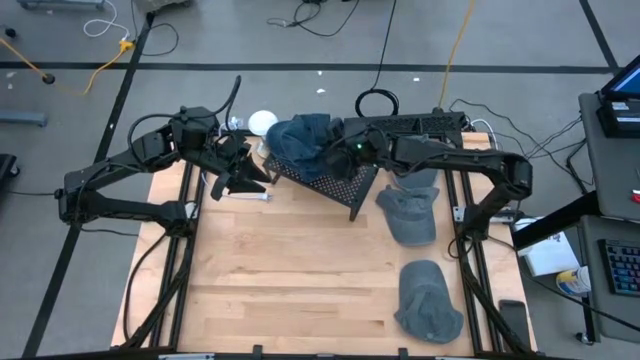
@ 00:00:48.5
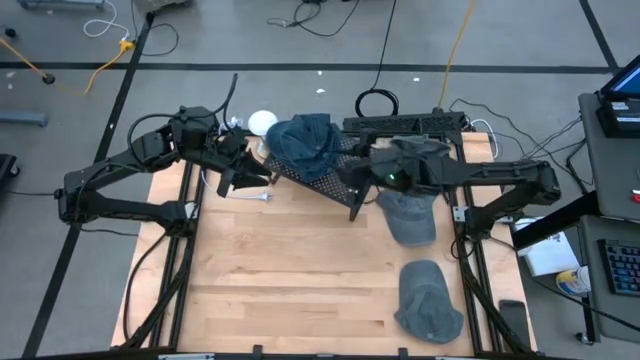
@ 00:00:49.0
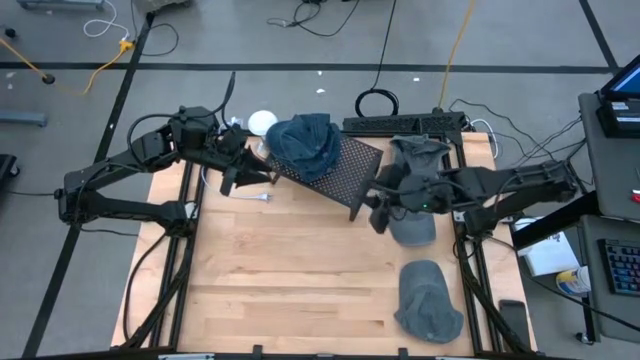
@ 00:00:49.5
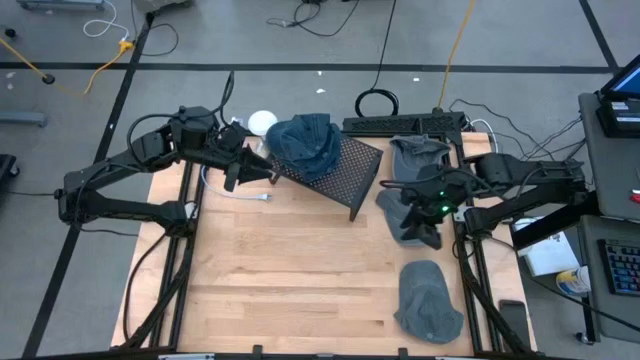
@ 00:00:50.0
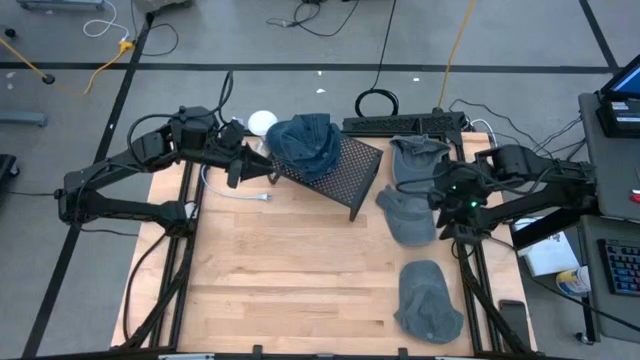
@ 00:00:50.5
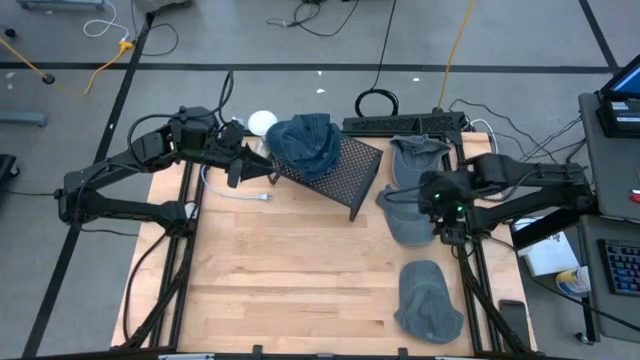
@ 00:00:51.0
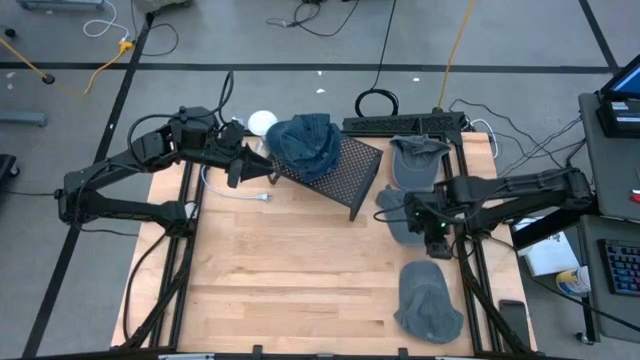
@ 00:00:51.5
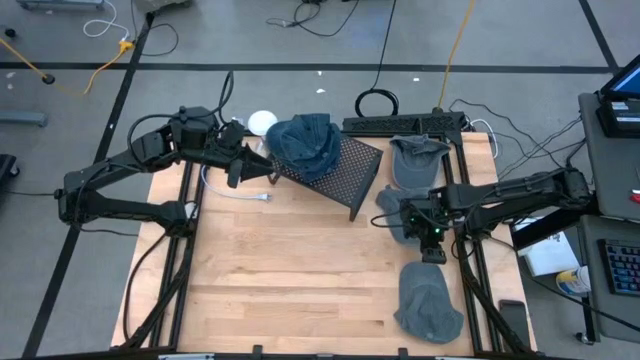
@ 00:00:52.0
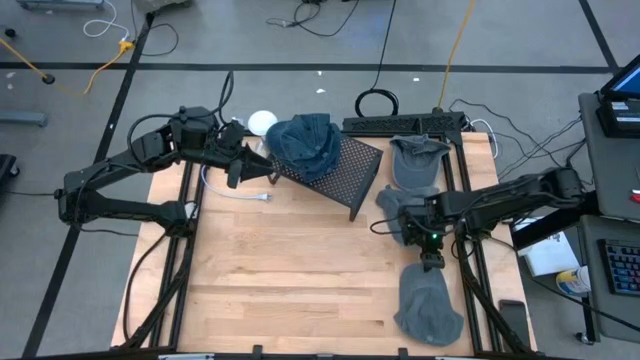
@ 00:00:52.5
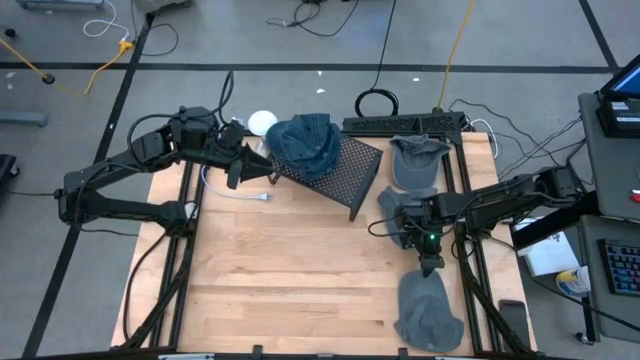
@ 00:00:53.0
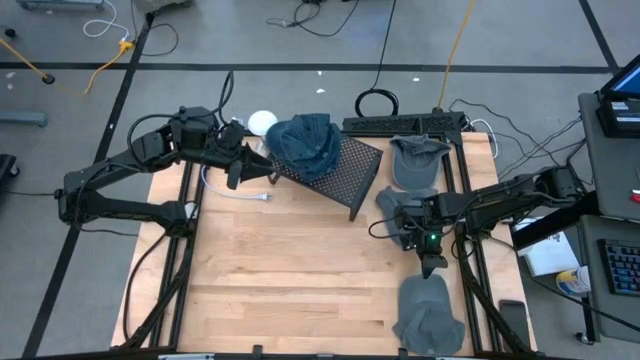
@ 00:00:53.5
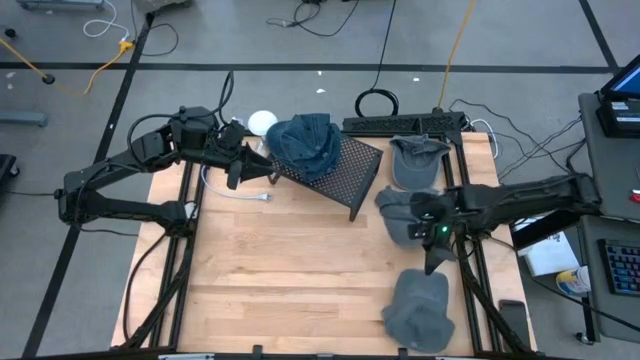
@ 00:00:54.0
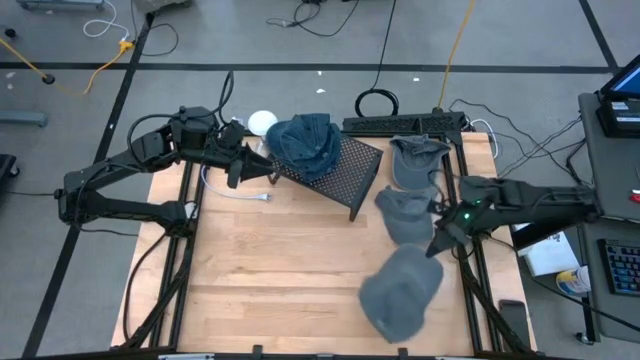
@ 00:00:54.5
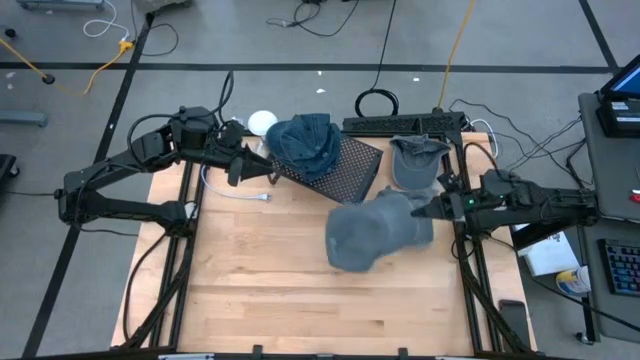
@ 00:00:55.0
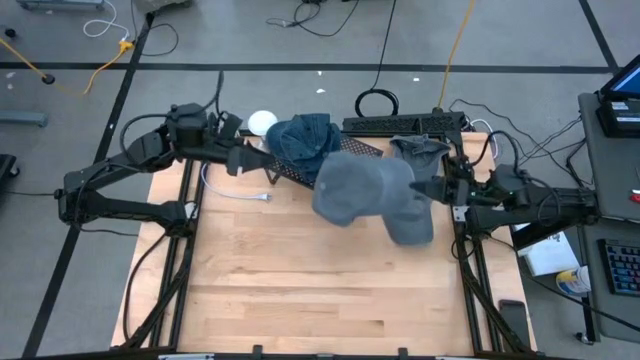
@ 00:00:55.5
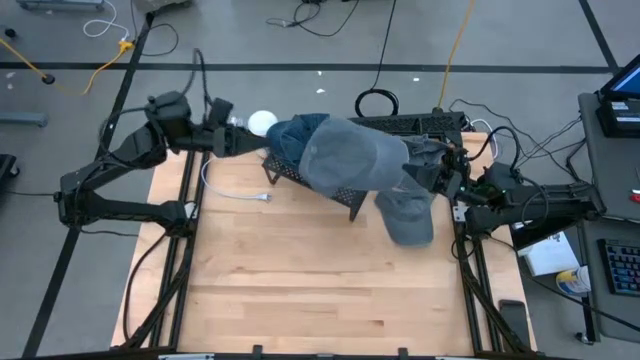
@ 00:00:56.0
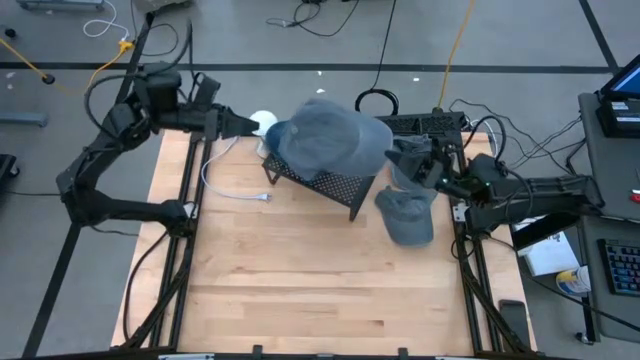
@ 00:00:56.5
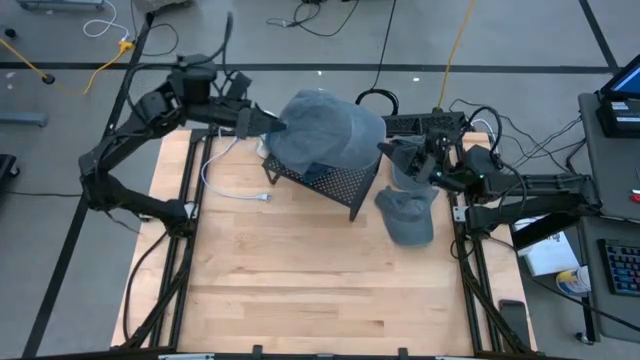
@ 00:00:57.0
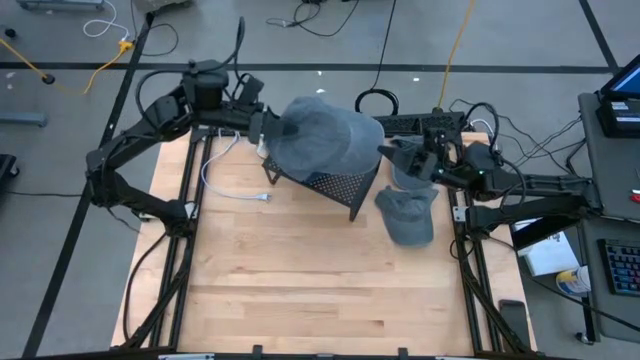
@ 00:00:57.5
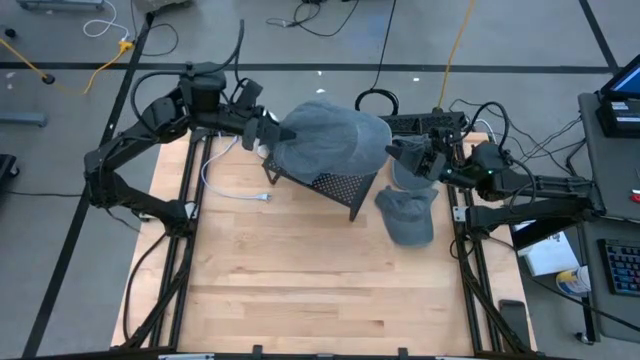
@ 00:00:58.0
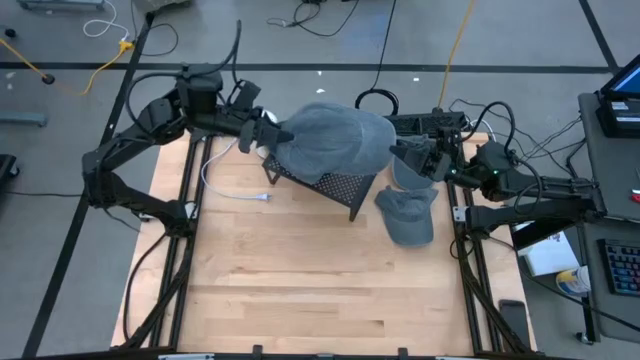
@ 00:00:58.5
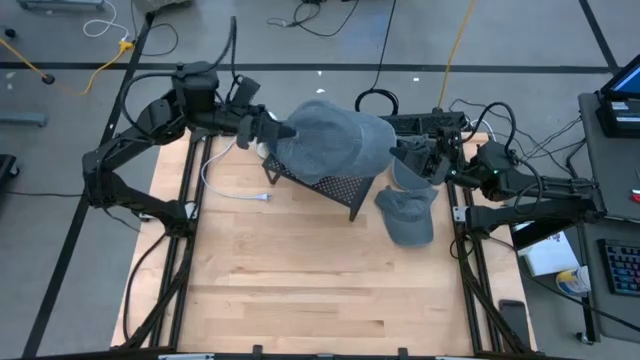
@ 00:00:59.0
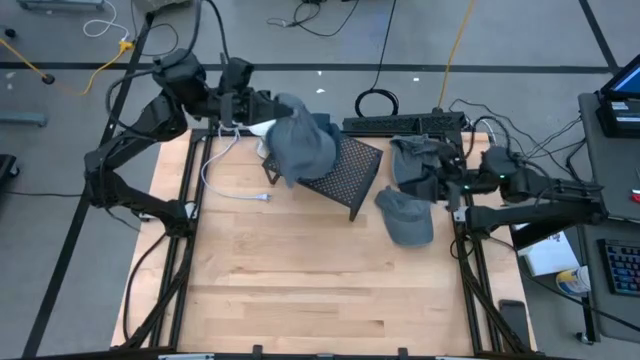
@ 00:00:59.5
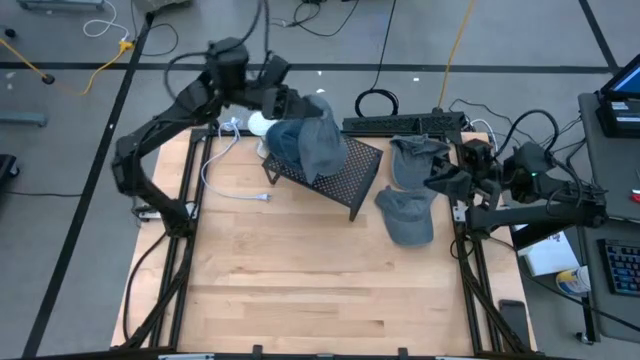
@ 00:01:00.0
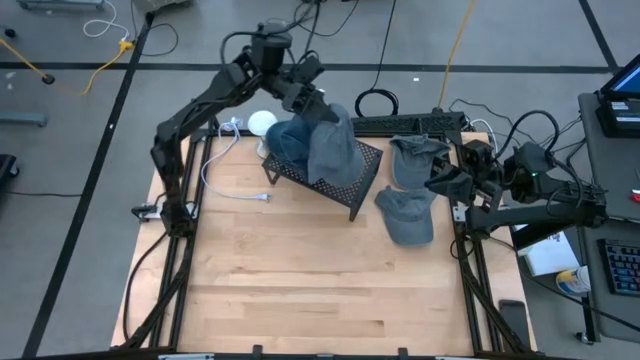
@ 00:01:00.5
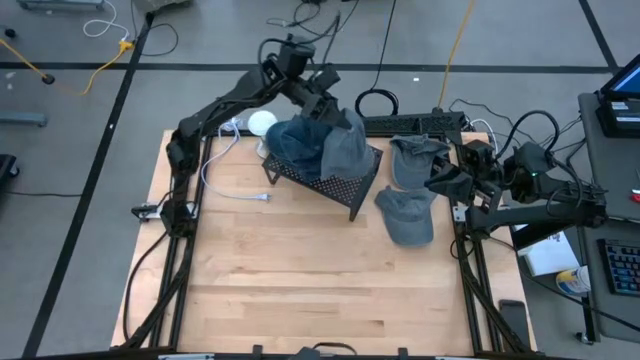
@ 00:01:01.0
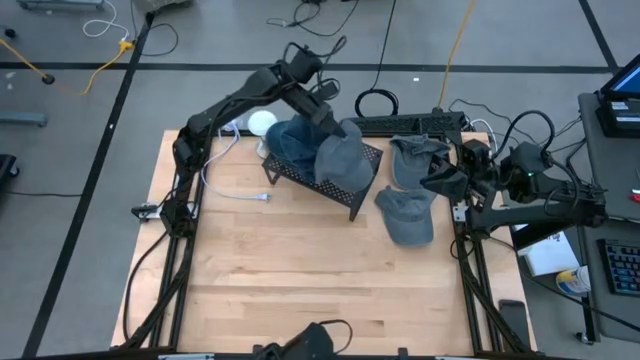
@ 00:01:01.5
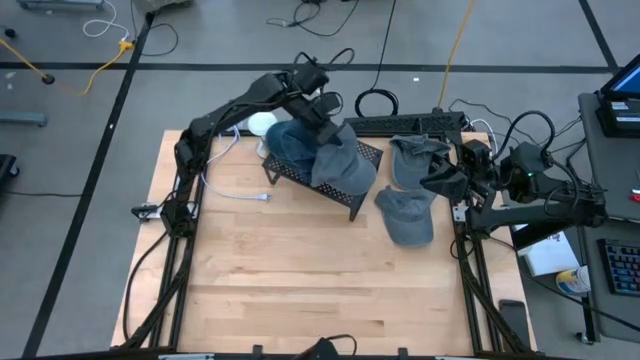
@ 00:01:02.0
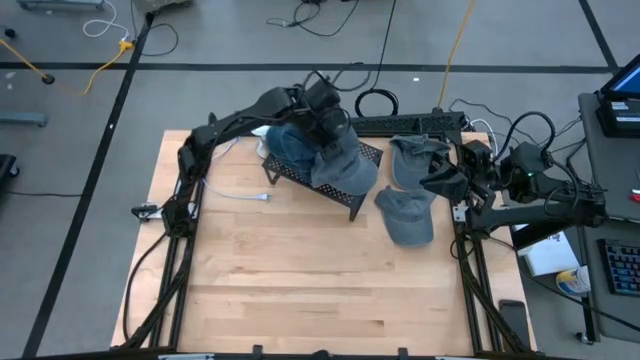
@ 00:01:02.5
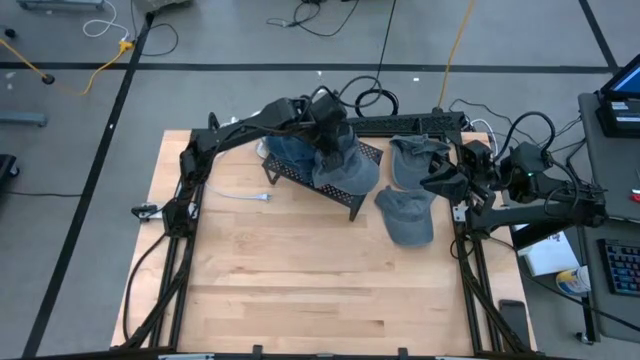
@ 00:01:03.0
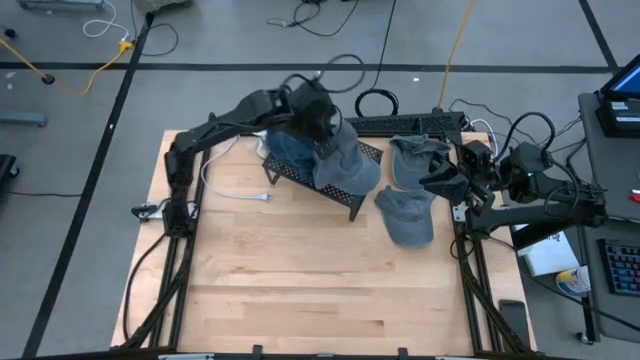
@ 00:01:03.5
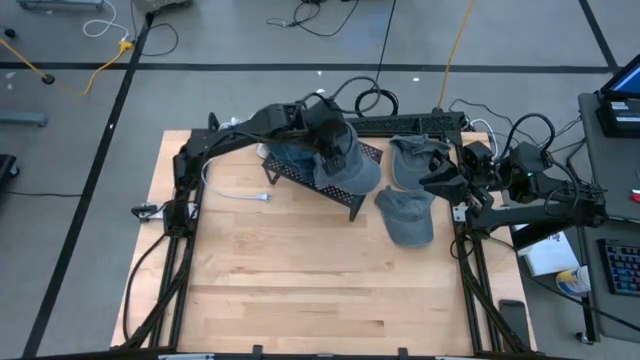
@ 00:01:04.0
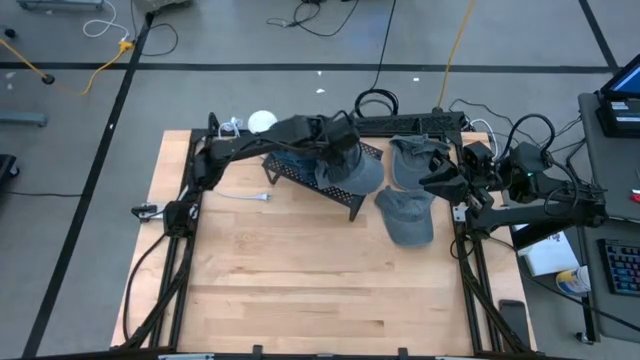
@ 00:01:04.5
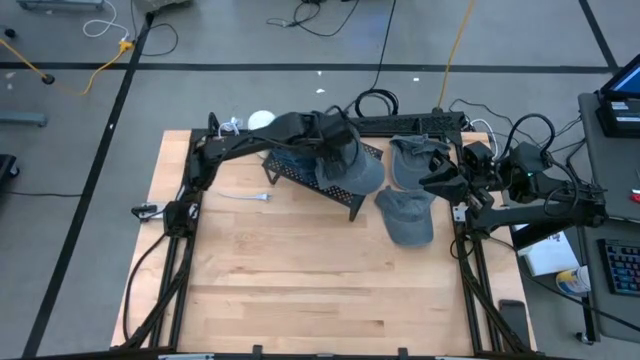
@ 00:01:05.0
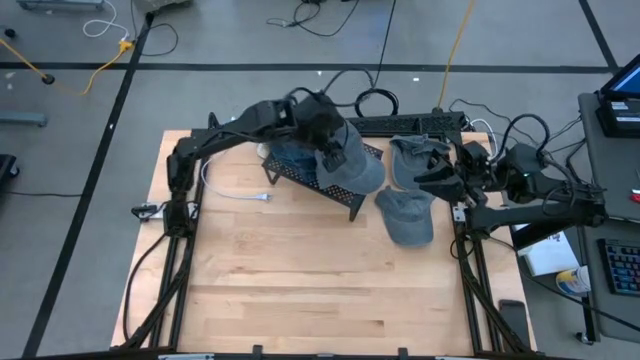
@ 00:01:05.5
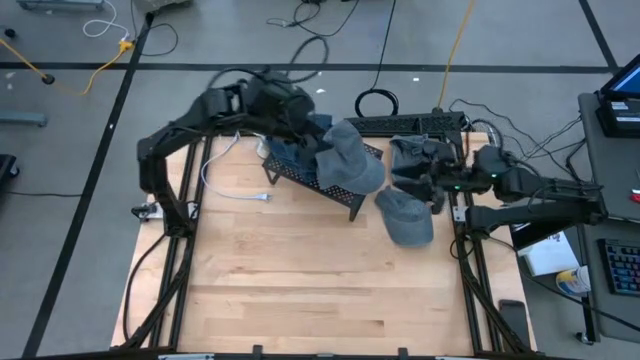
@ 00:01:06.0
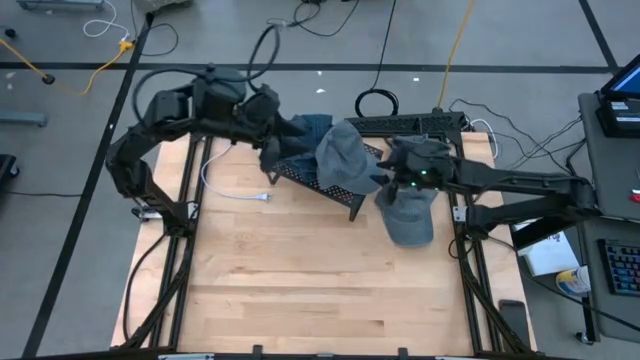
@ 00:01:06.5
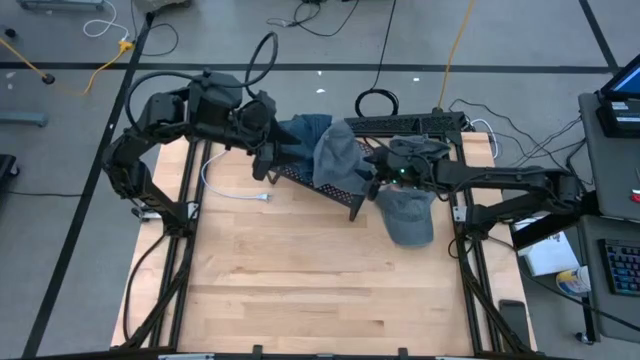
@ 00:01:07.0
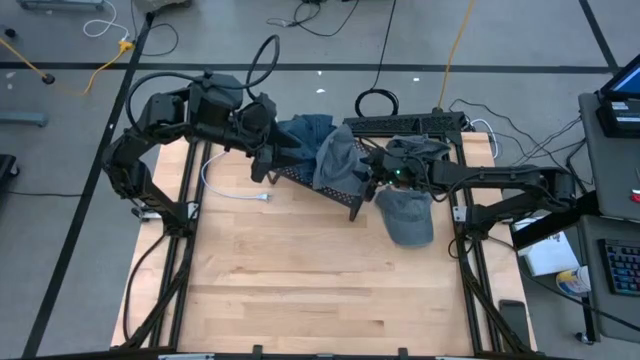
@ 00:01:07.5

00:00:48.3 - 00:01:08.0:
Task: Pick & Place hat
Put the bottom gray cap on the shelf
